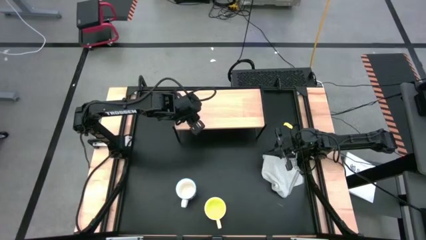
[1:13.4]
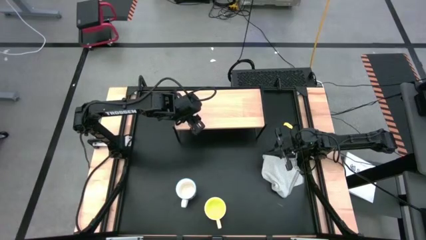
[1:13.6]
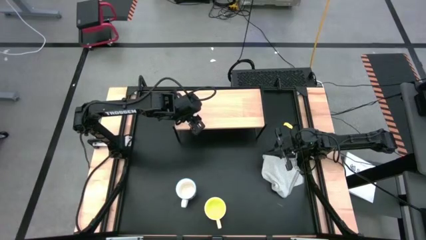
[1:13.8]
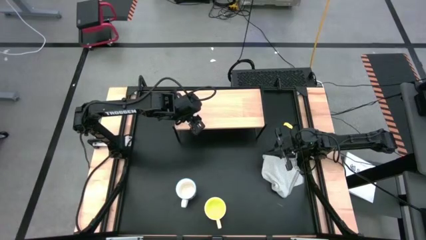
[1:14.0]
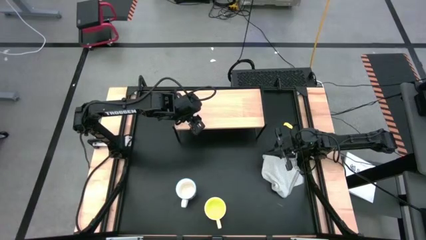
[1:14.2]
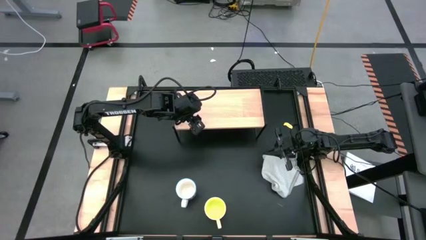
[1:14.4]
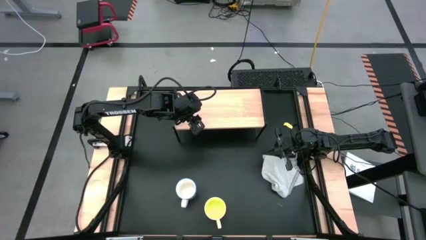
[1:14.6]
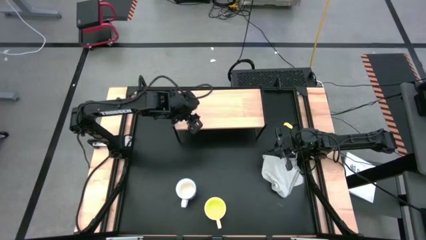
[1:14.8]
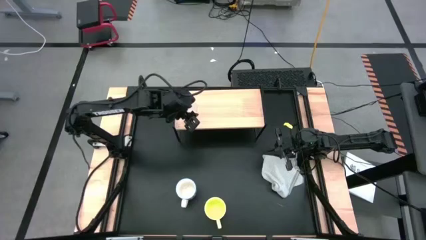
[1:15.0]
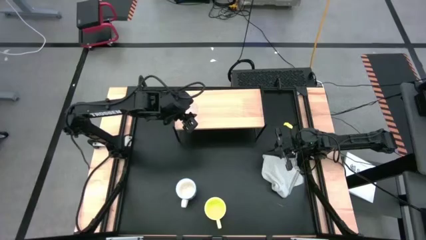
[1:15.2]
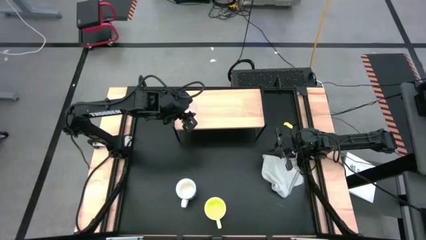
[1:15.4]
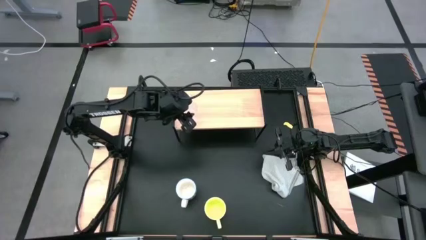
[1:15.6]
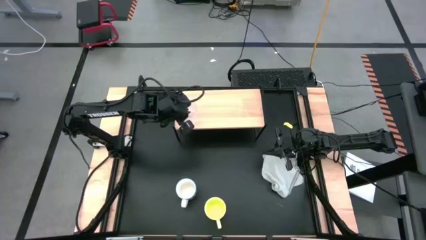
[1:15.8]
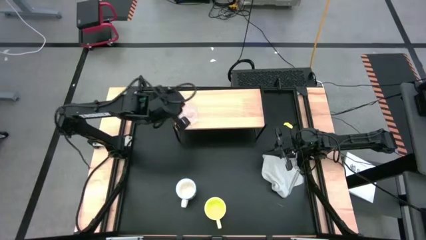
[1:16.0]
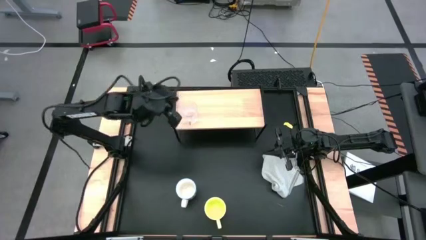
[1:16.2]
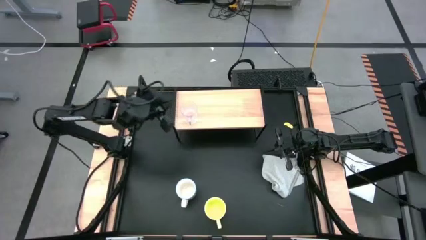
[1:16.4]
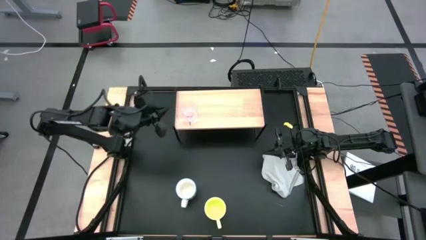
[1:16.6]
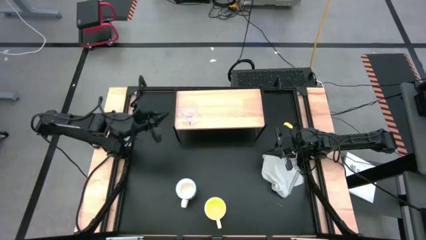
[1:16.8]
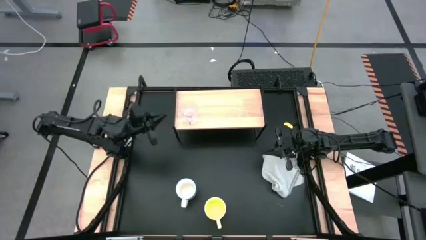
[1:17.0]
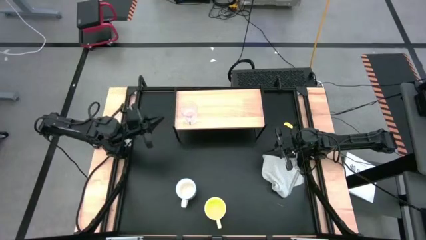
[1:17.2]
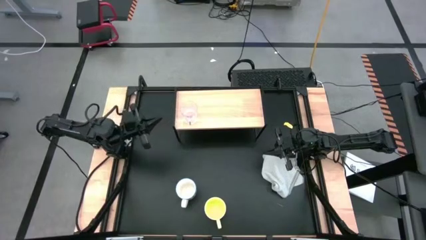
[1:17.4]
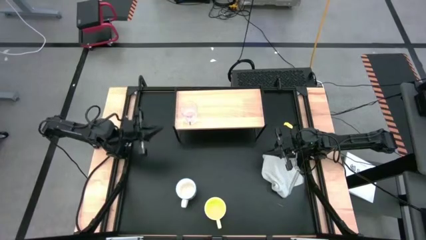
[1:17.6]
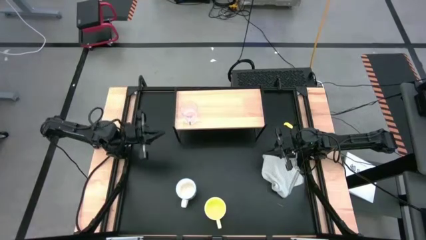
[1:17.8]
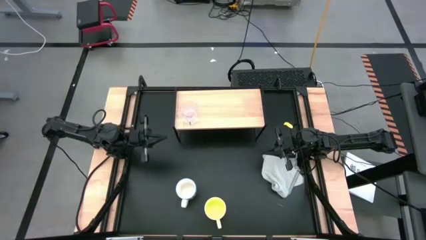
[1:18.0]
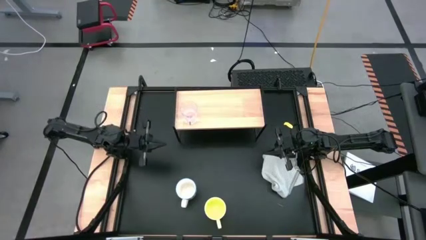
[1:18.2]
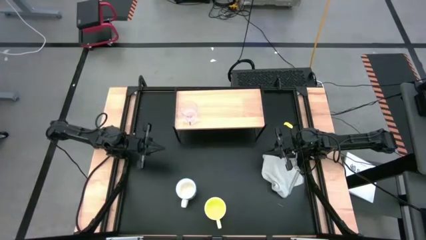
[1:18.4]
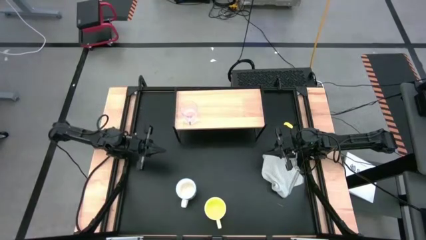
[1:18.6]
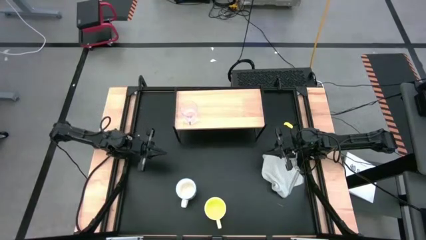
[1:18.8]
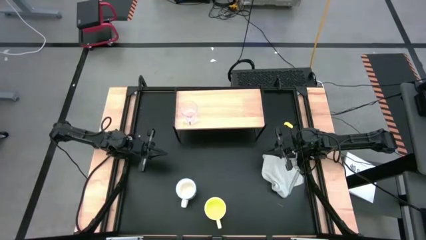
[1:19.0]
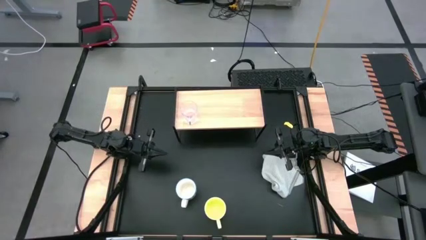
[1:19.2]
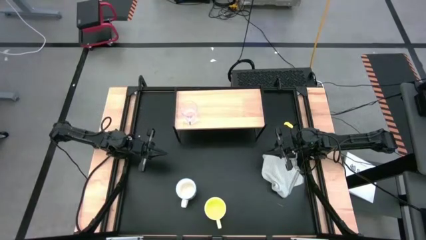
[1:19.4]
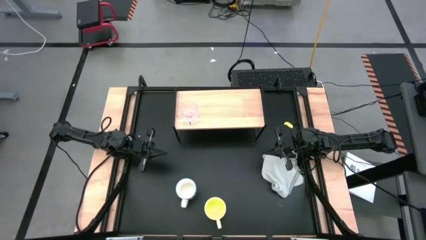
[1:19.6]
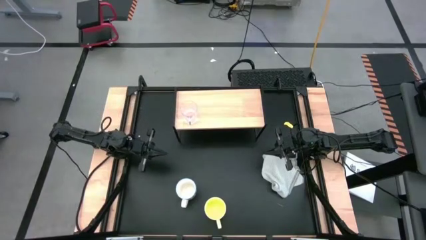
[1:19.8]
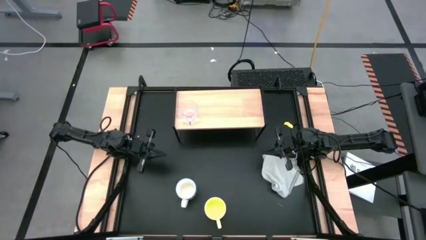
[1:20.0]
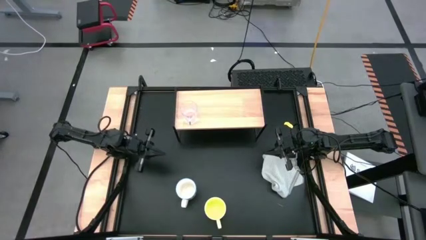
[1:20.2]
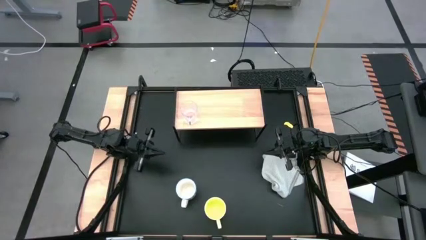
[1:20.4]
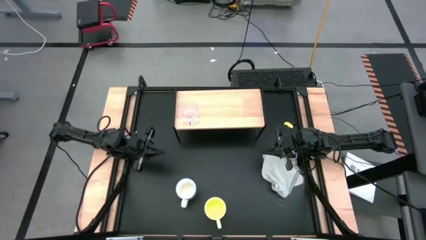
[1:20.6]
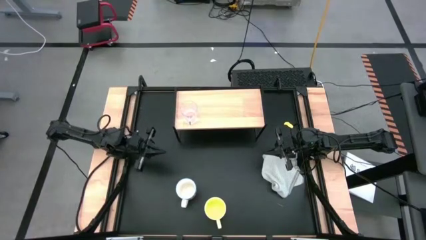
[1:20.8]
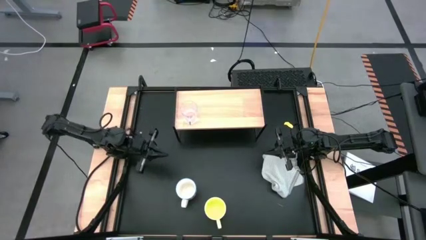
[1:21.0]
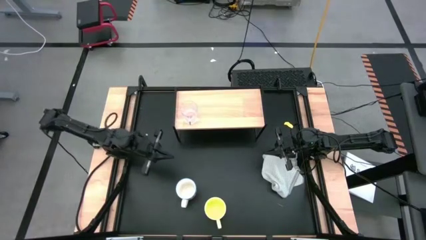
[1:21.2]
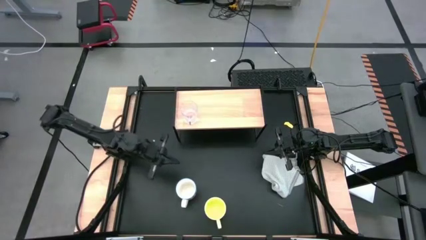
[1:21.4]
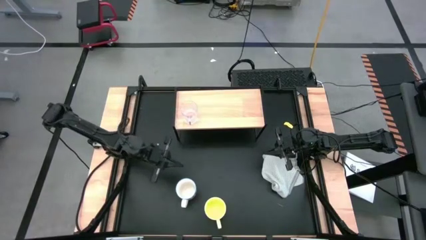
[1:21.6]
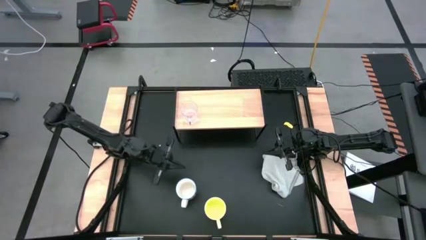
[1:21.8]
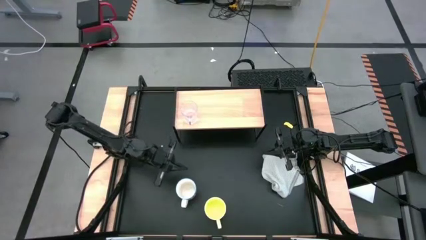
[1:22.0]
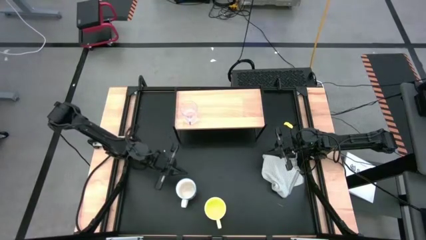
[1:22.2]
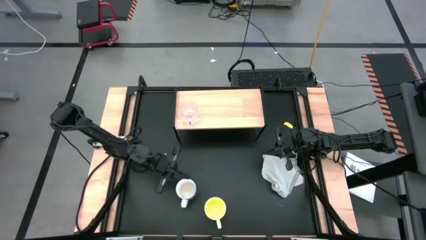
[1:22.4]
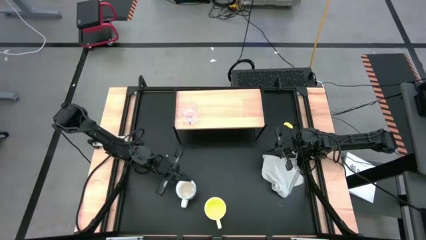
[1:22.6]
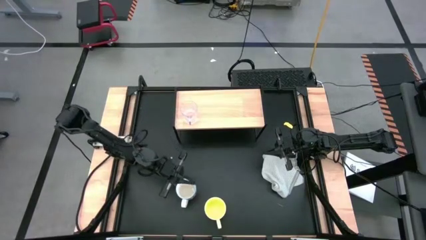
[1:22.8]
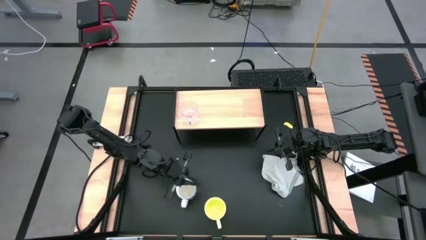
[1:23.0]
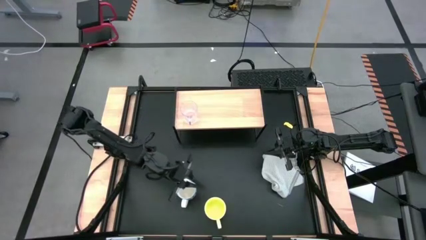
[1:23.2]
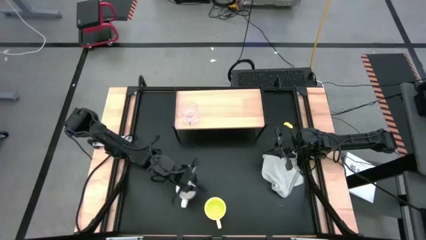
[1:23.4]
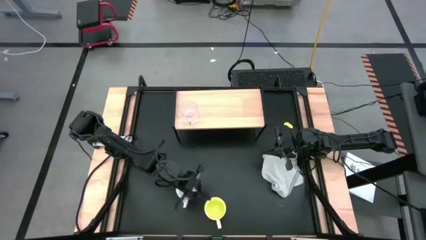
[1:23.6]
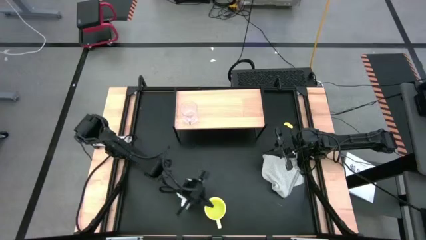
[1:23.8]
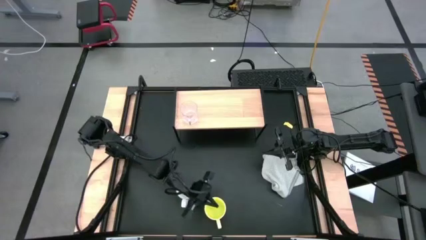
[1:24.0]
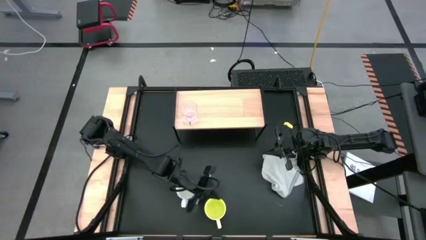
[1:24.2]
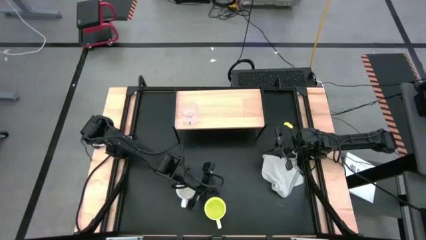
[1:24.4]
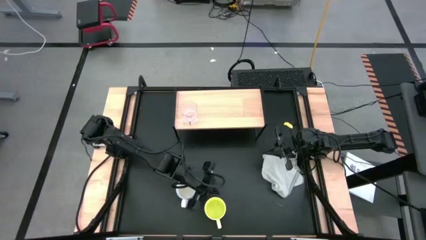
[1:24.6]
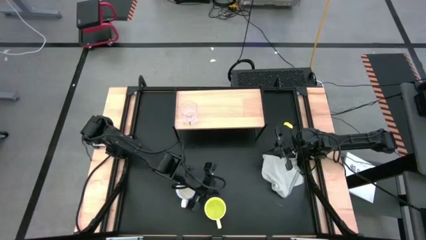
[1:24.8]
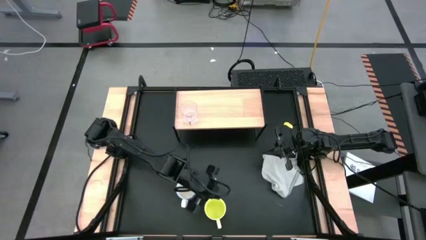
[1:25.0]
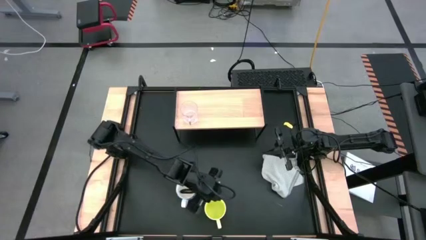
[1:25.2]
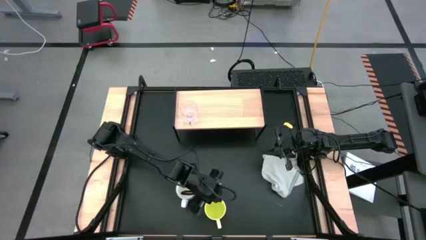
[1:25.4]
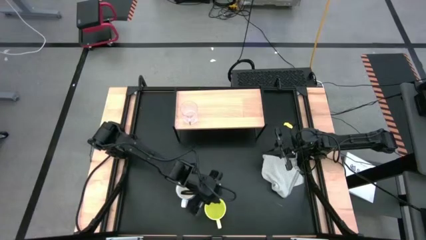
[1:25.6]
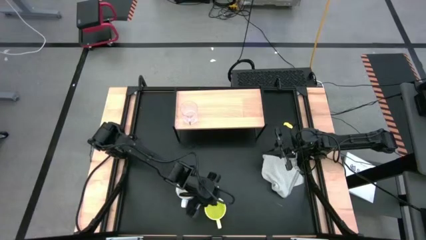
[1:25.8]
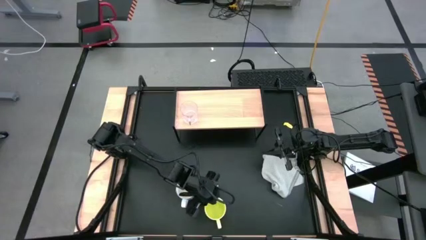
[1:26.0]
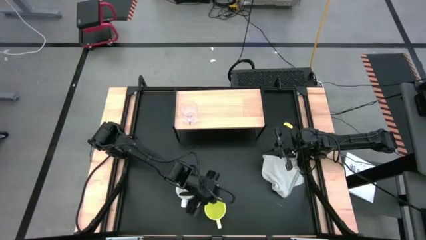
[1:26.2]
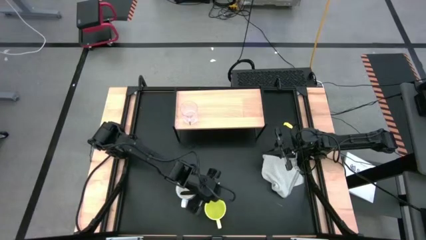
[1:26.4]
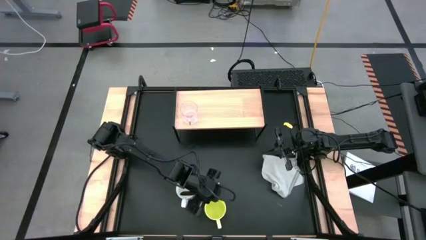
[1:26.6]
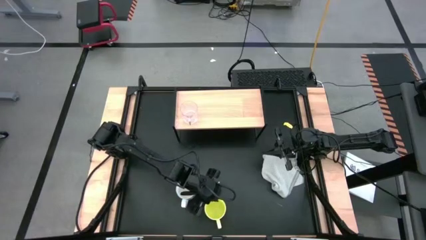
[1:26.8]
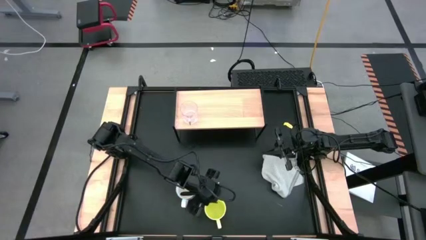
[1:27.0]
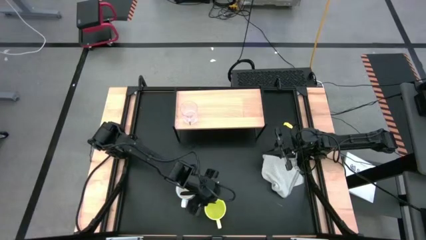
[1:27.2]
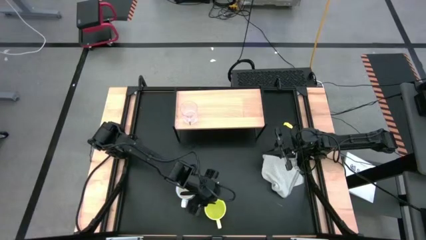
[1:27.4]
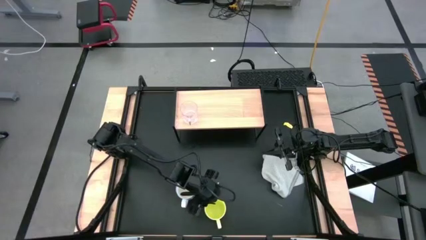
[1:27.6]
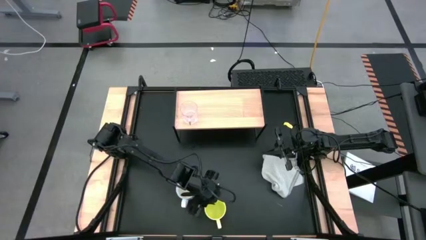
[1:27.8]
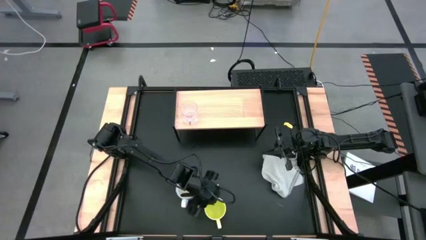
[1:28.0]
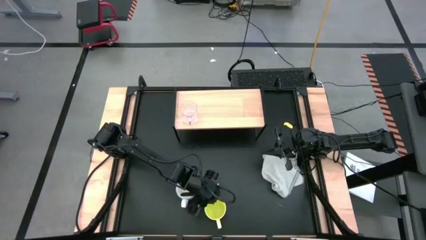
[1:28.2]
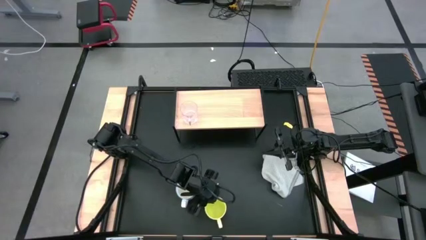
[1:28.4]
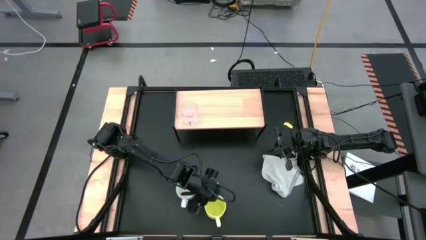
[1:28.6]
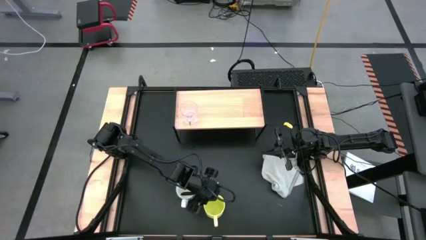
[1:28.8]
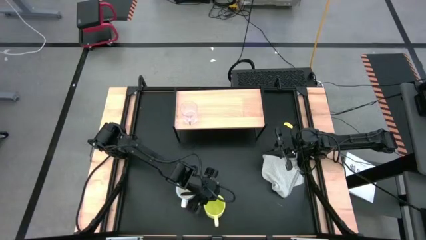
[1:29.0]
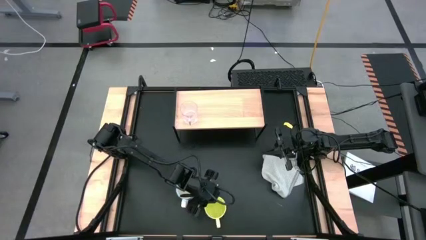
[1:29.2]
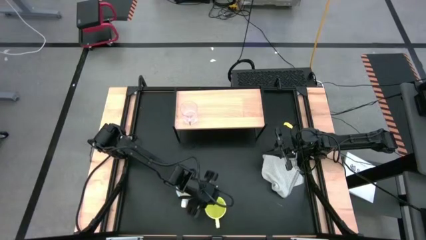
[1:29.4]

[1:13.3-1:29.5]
Task: Stack small to large cups/mugs on shelf
Put the yellow mug on the shelf
